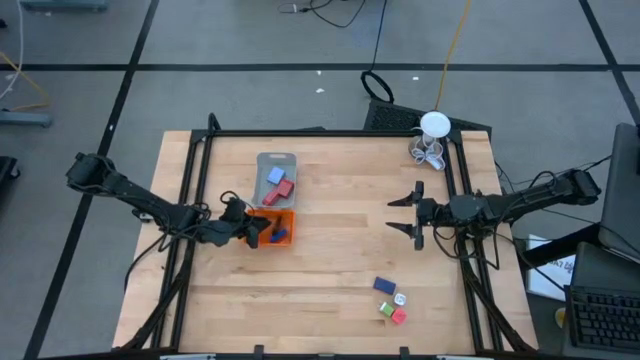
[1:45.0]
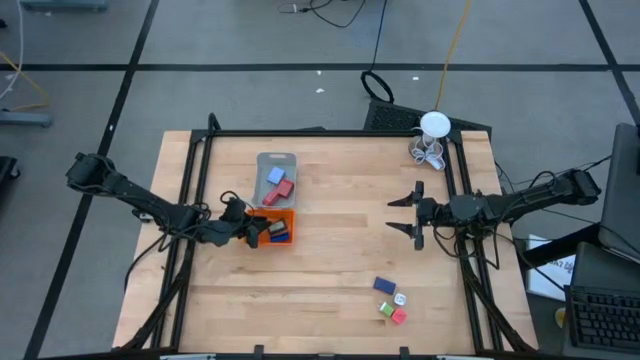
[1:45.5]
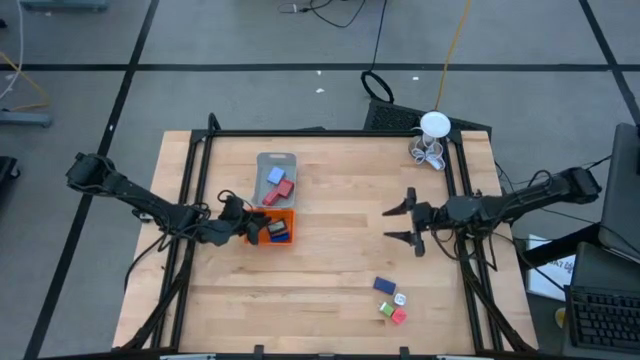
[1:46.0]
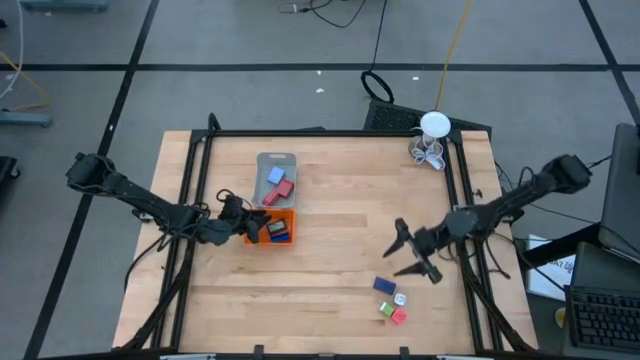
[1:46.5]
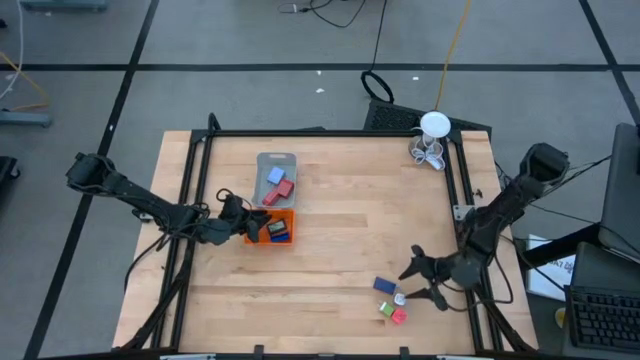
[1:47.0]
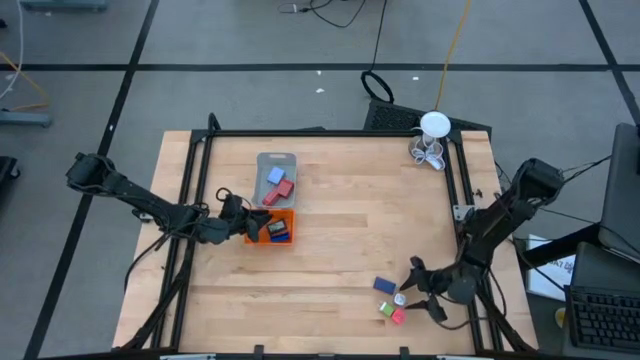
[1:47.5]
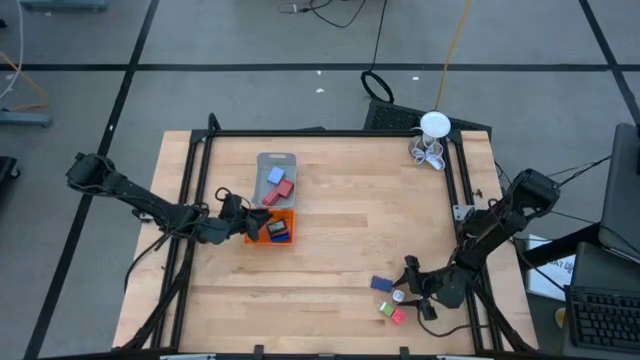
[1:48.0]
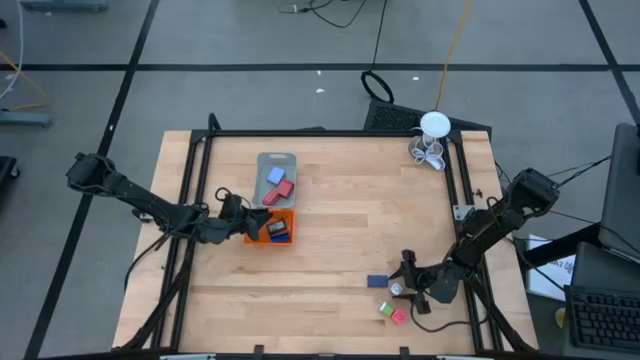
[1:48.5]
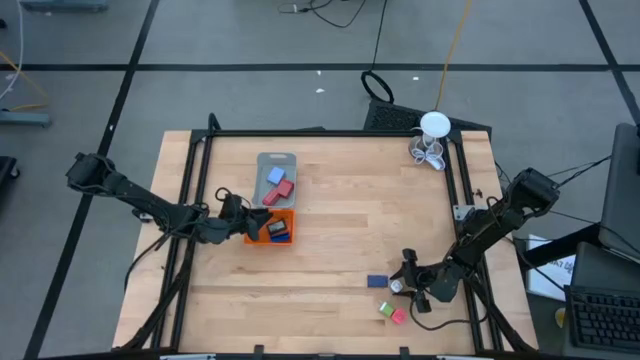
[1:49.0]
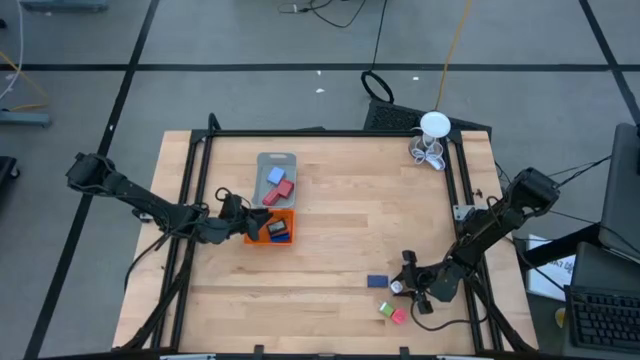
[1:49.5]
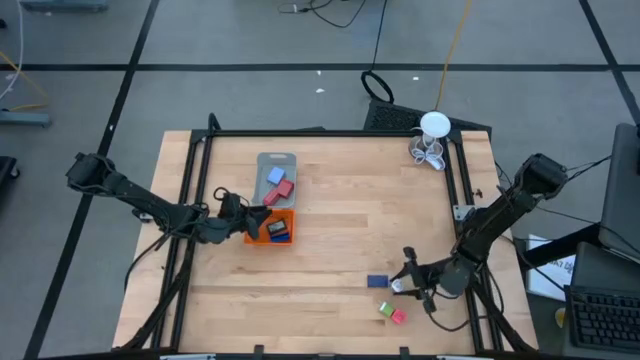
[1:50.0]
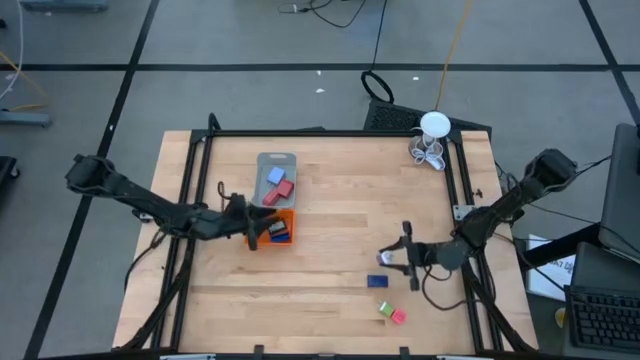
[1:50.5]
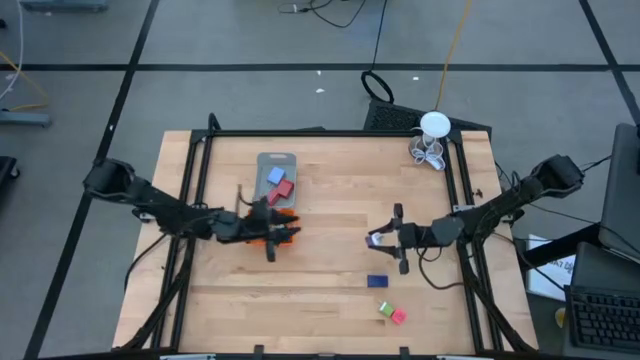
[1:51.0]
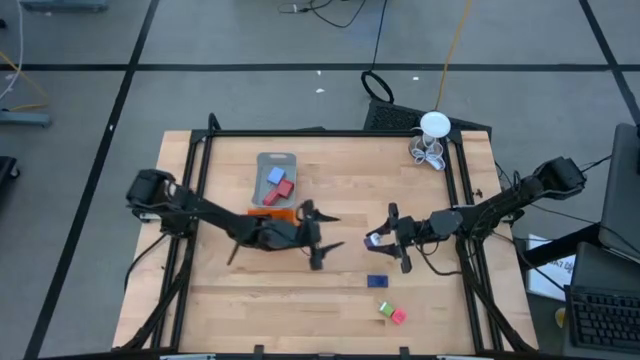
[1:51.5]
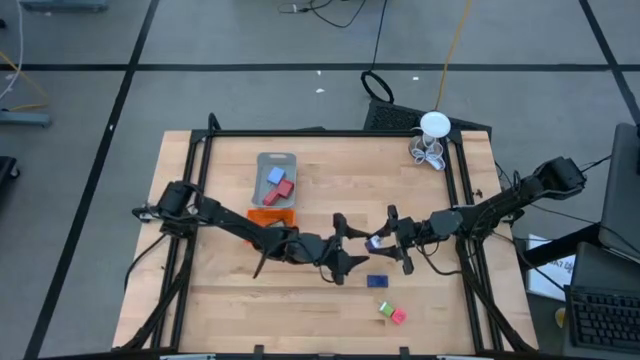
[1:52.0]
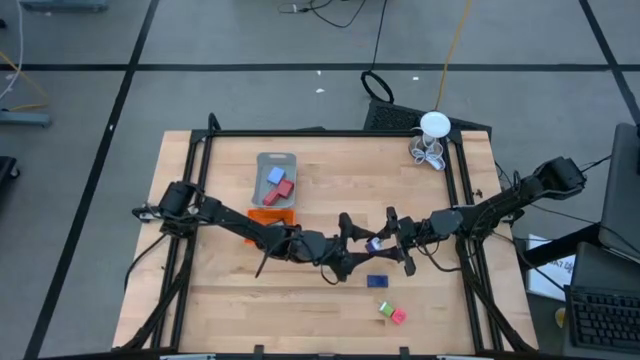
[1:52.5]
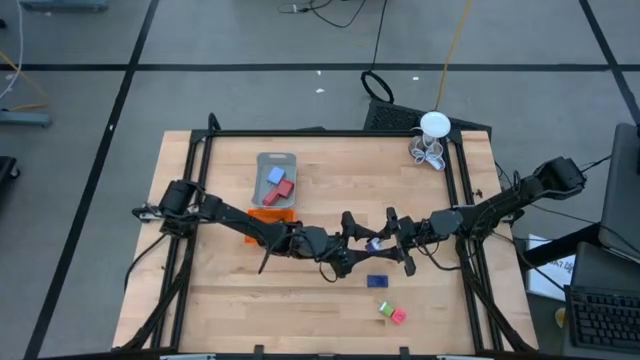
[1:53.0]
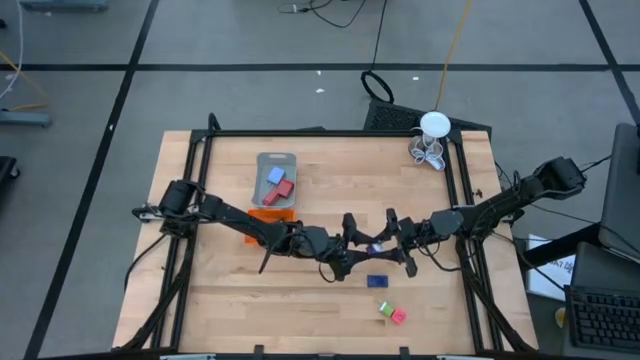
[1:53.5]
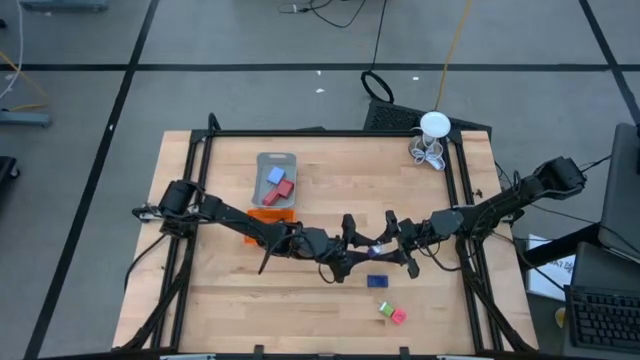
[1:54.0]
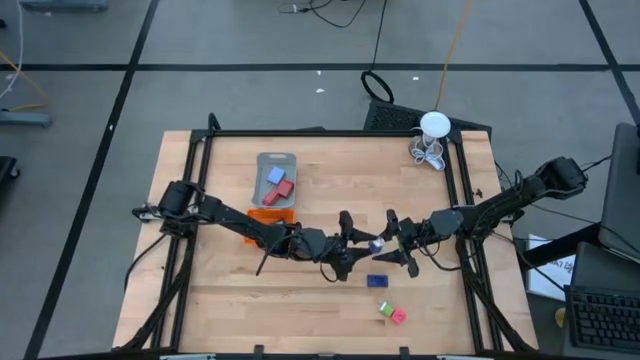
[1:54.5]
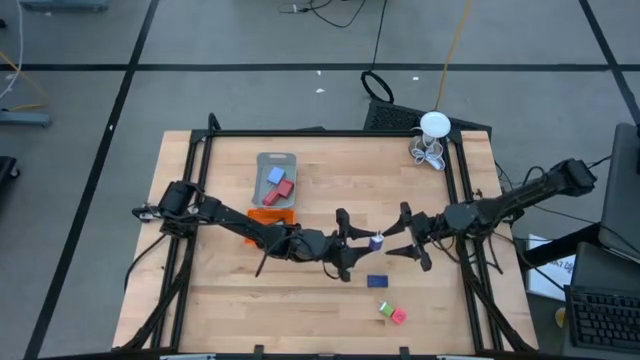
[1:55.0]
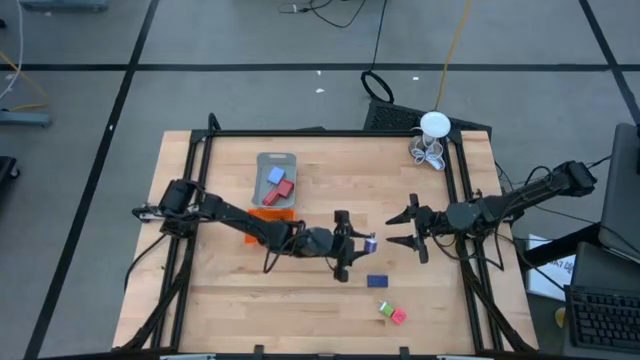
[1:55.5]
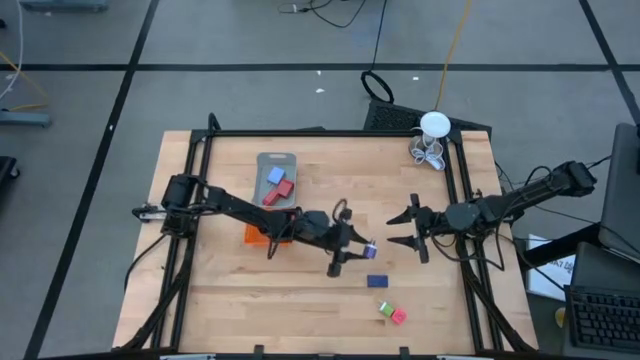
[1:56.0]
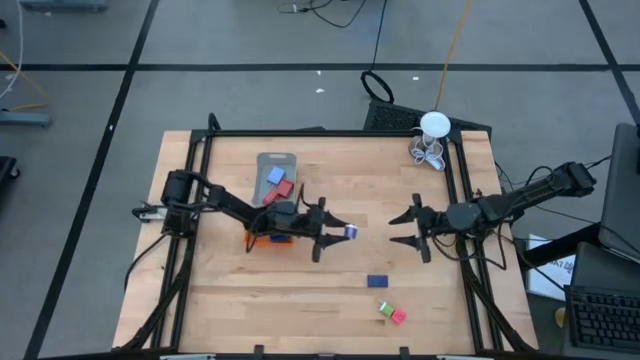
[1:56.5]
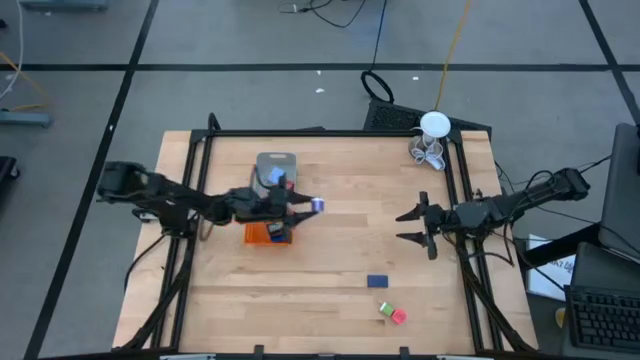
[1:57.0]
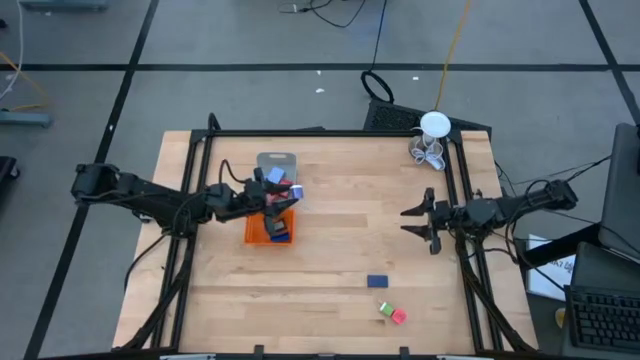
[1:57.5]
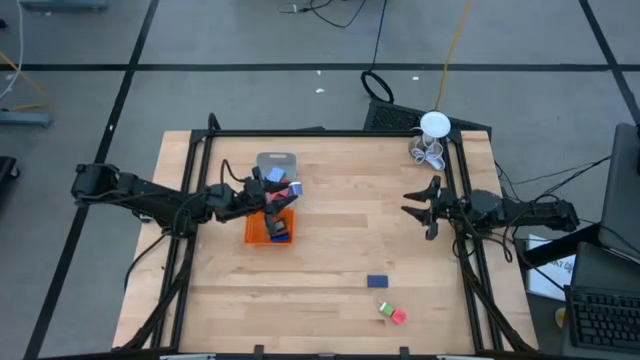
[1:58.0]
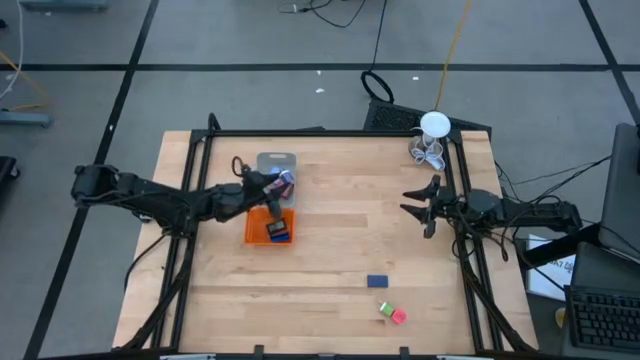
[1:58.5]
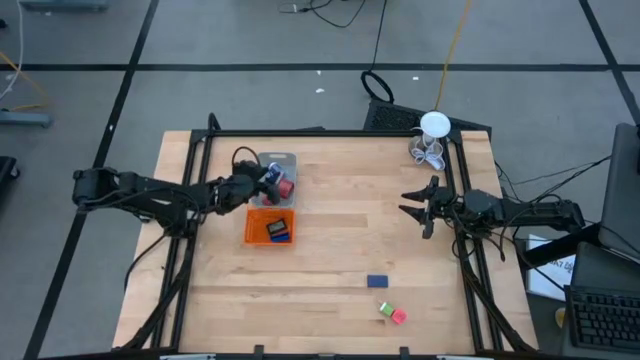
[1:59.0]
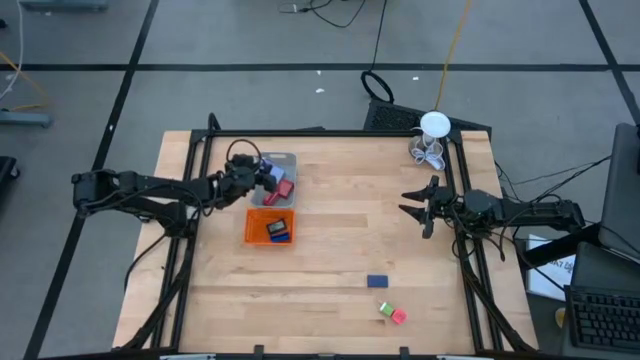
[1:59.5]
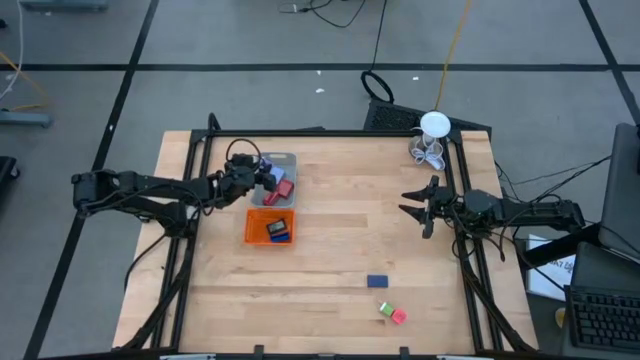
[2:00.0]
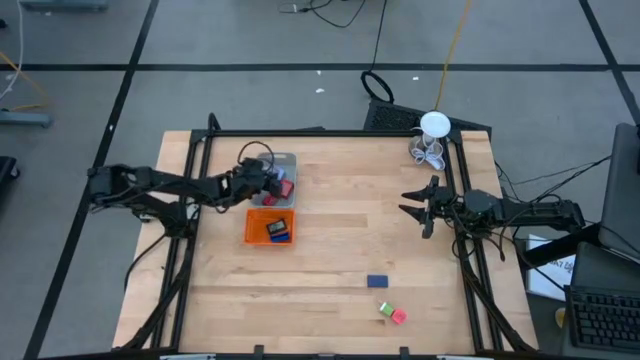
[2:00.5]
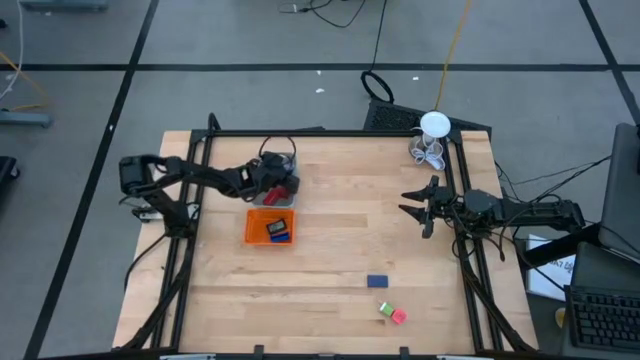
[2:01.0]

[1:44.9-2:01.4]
Task: Pick & Place Office items
Put the violet charger adapter into the gray bin

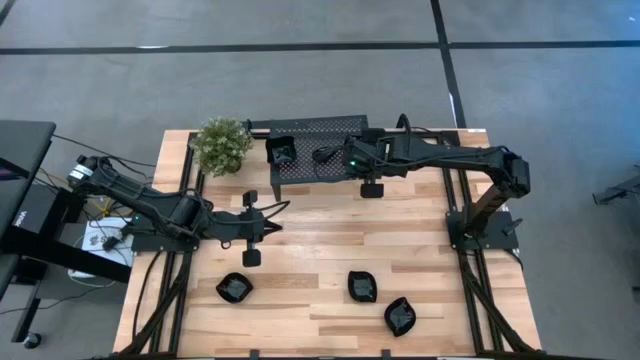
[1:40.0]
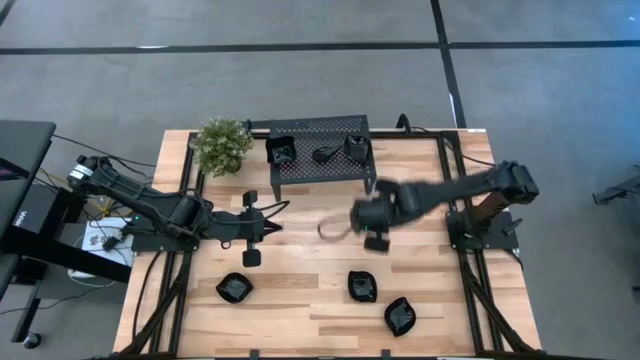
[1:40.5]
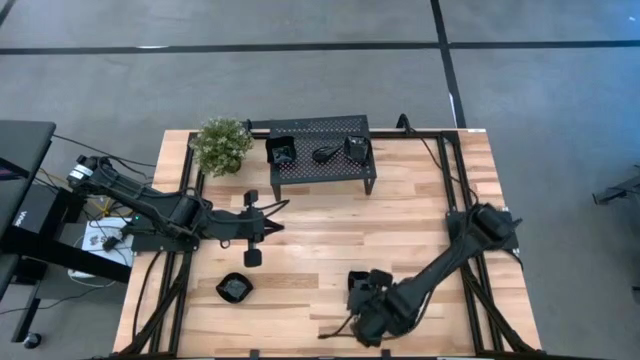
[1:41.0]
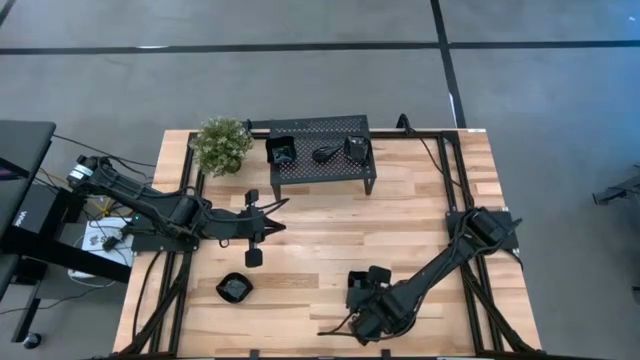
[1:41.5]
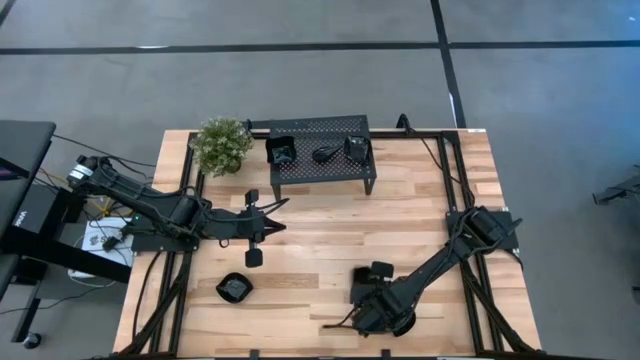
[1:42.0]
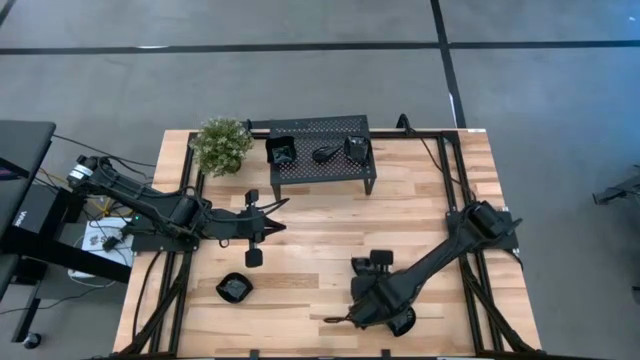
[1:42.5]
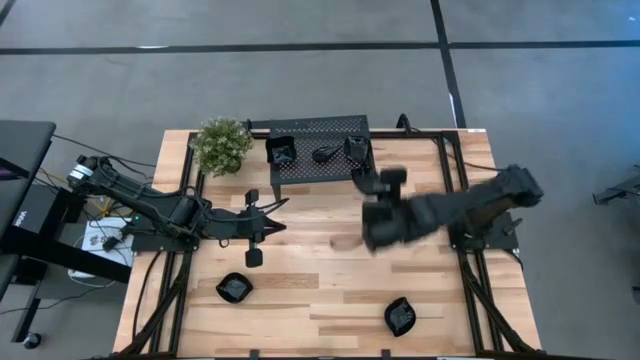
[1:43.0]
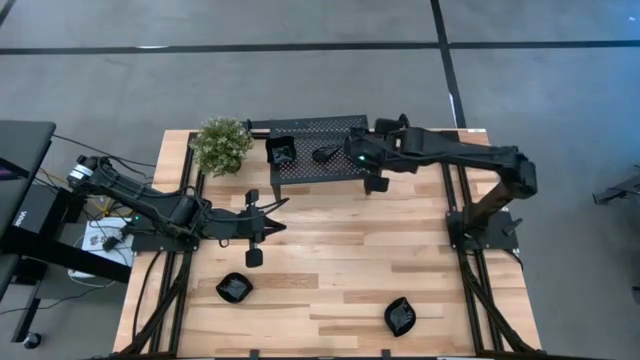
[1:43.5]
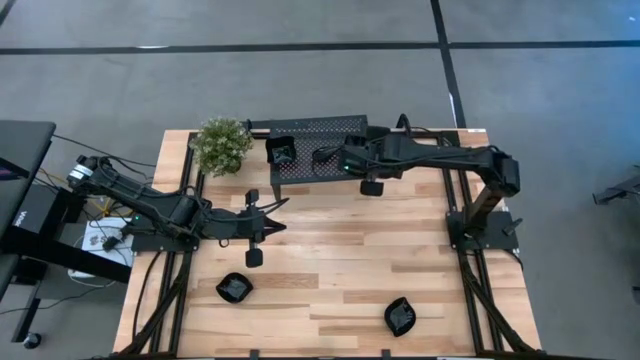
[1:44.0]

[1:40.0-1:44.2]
Task: Pick & Place Mini shaped plates
Stack the leaf shaped plate on top of the leaf shaped plates on the shelf
